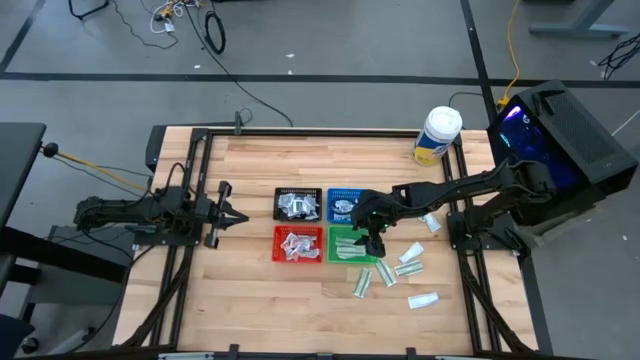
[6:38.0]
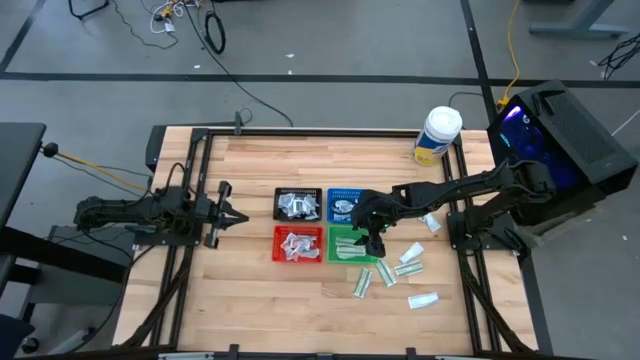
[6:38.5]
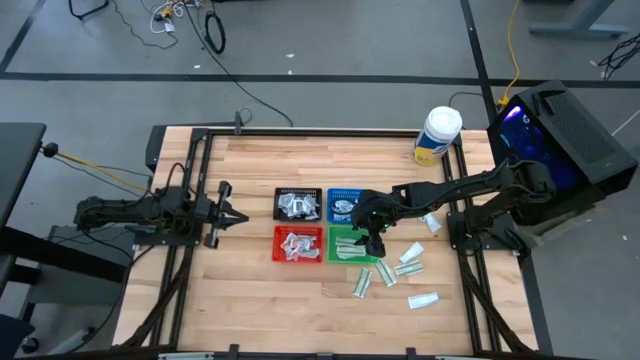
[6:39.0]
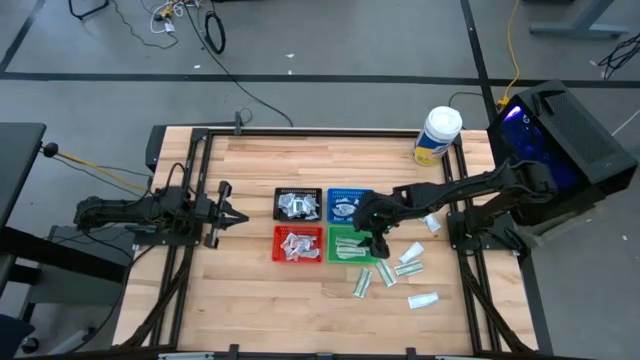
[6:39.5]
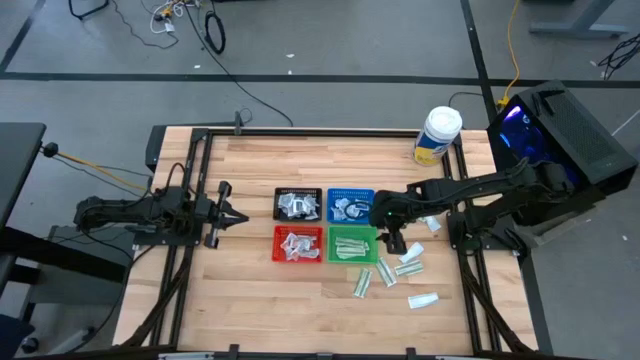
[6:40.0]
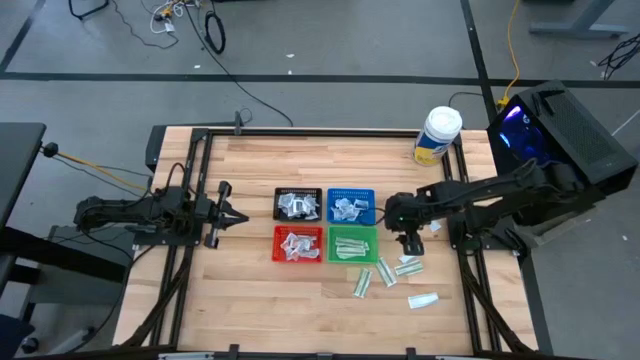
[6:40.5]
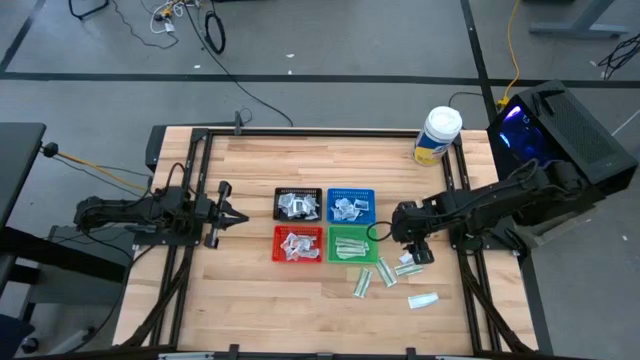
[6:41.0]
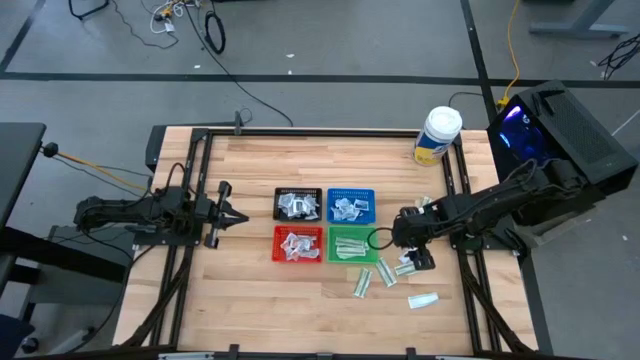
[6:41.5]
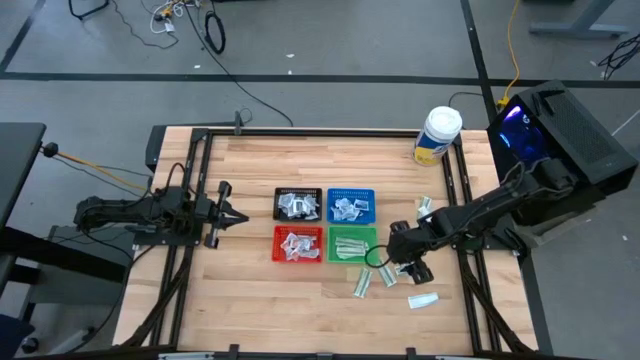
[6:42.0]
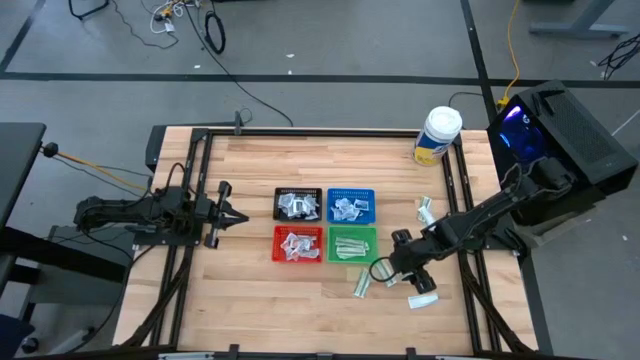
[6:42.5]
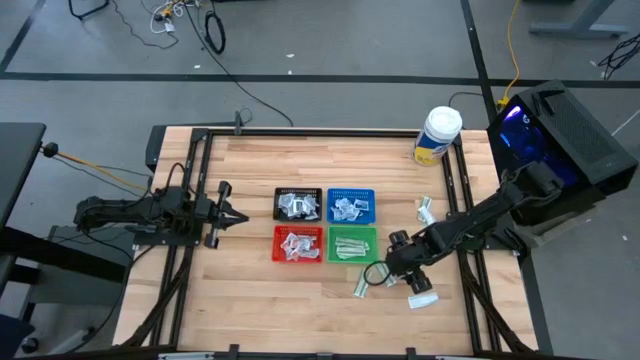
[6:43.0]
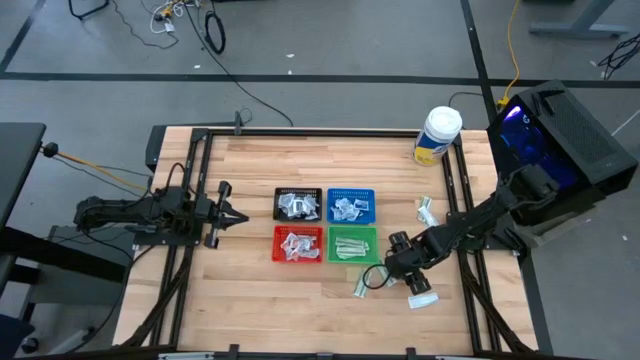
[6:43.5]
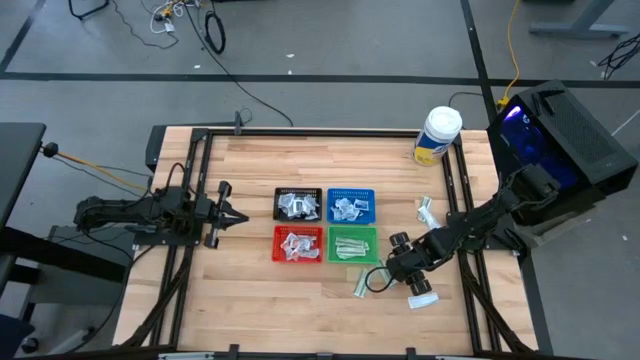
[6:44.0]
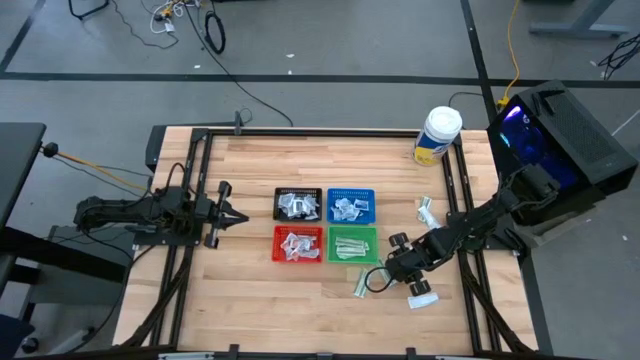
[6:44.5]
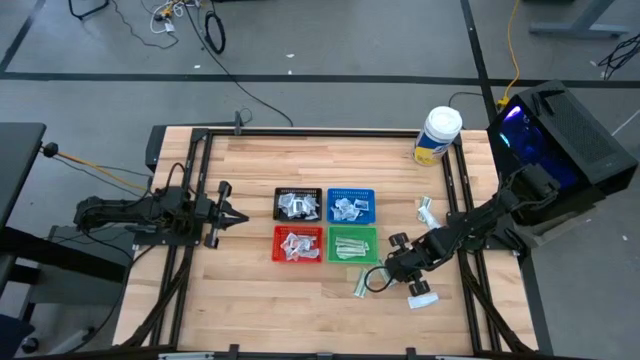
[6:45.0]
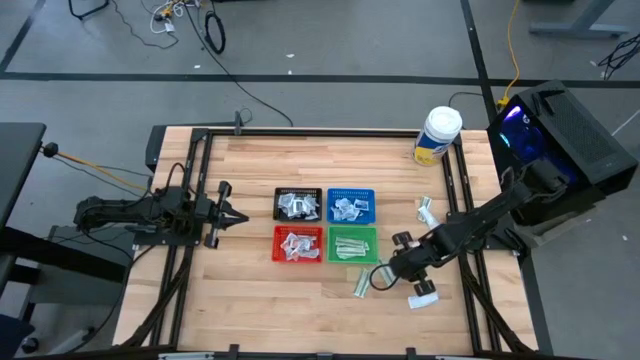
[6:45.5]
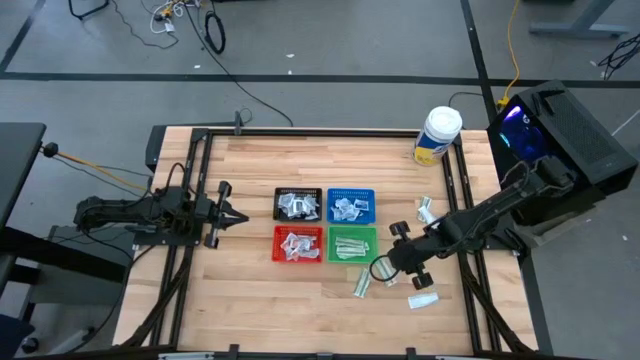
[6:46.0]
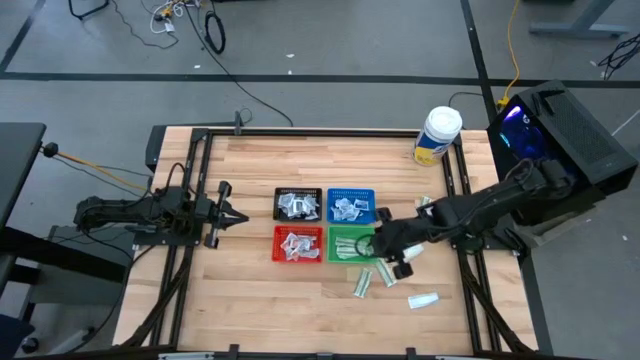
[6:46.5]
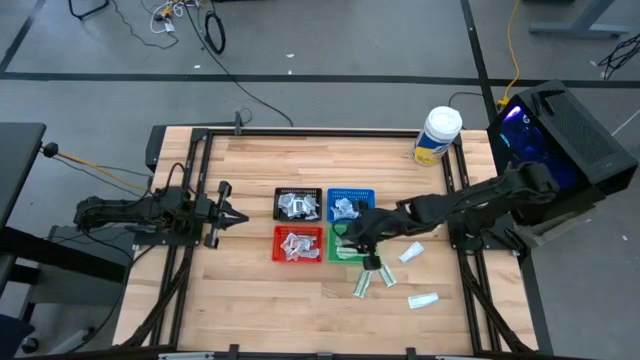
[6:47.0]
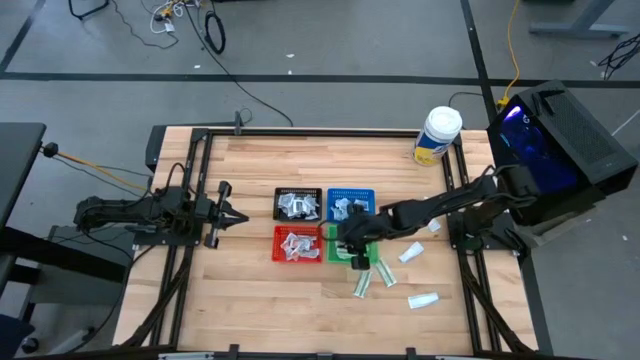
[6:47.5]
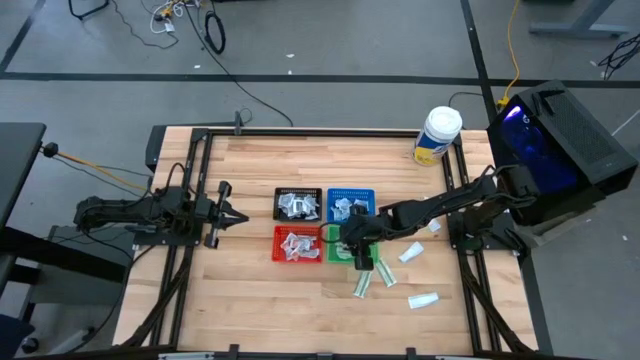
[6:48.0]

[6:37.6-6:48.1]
Task: Pick & Place First Aid Supplies
Put the green bandage pack into the green bin

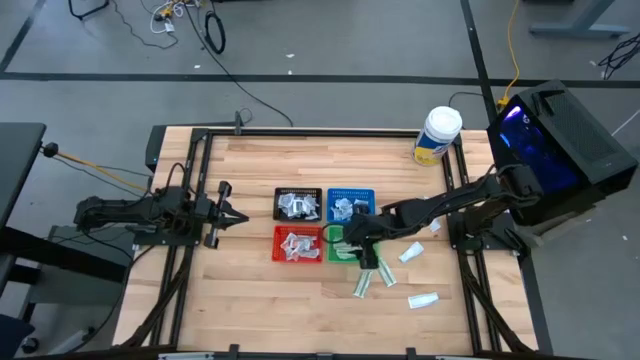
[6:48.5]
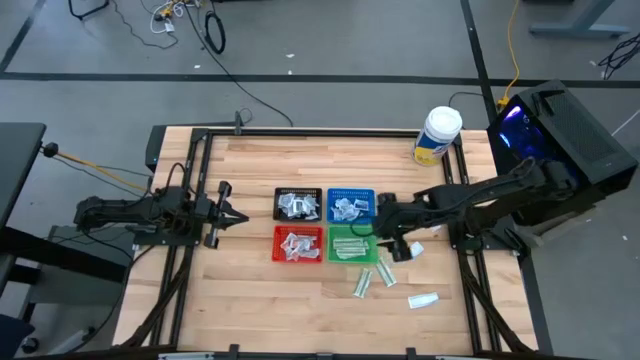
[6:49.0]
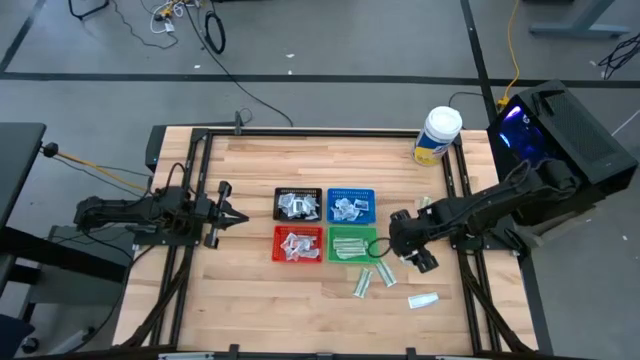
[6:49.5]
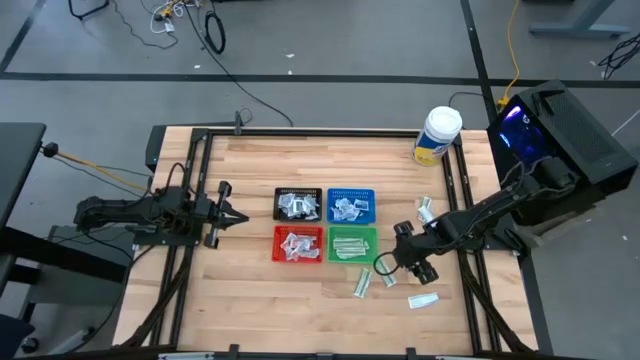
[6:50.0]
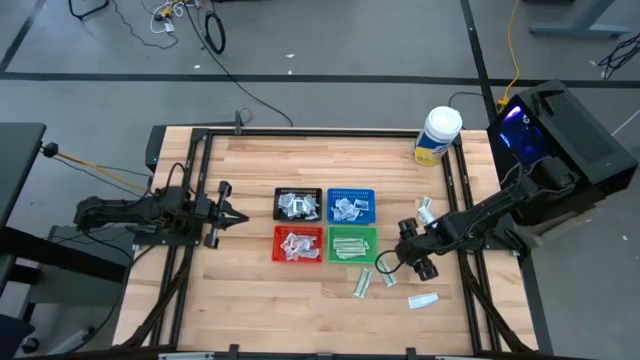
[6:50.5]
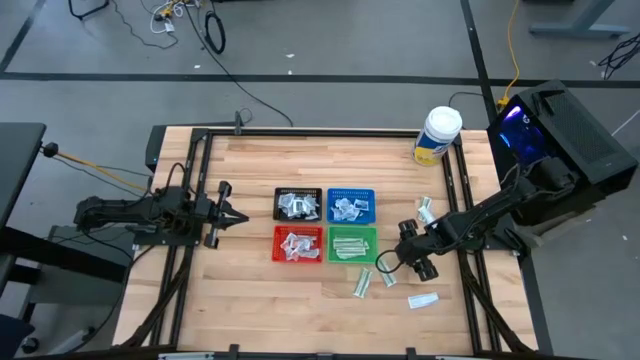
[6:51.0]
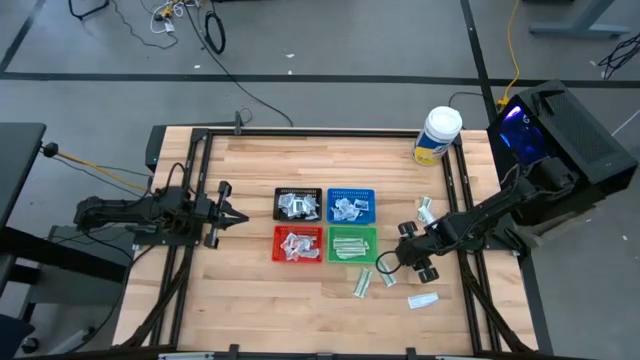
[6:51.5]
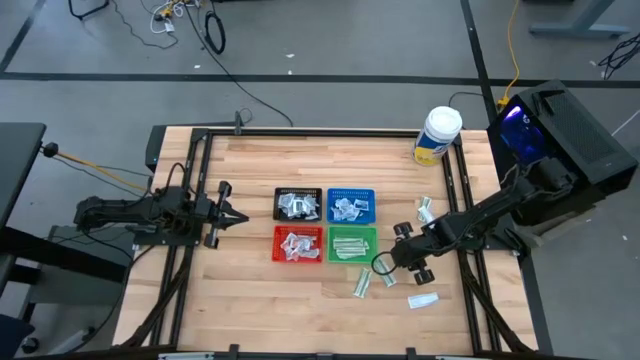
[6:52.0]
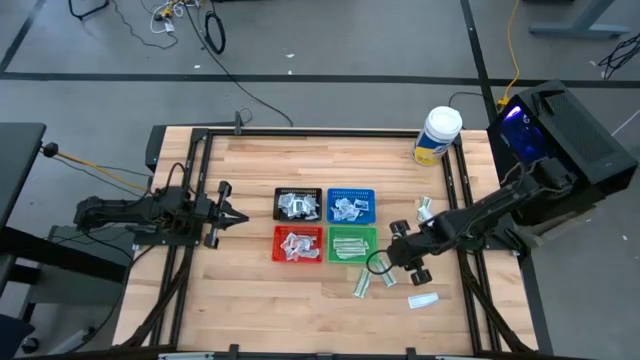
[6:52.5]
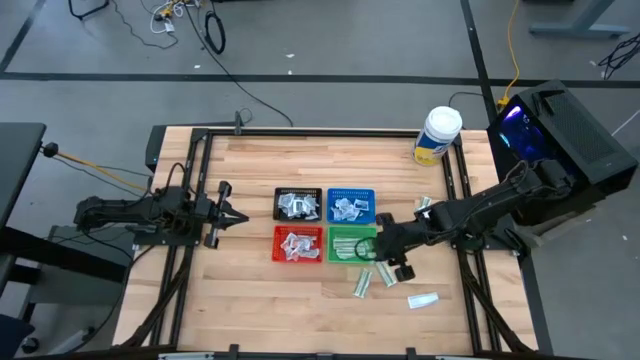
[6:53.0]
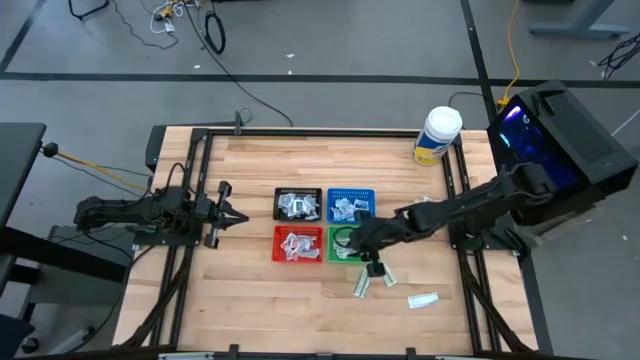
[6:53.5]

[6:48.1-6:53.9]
Put the green bandage pack into the green bin

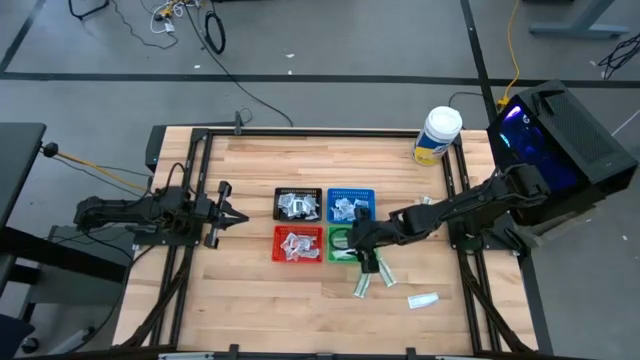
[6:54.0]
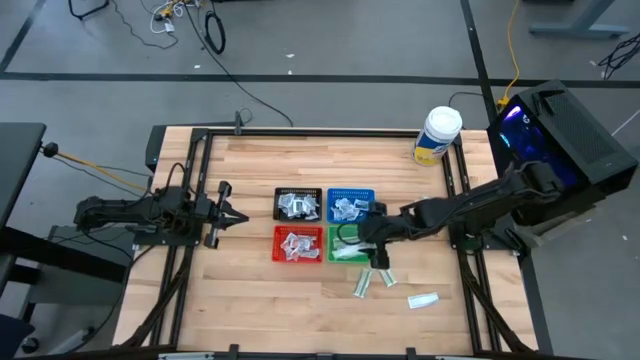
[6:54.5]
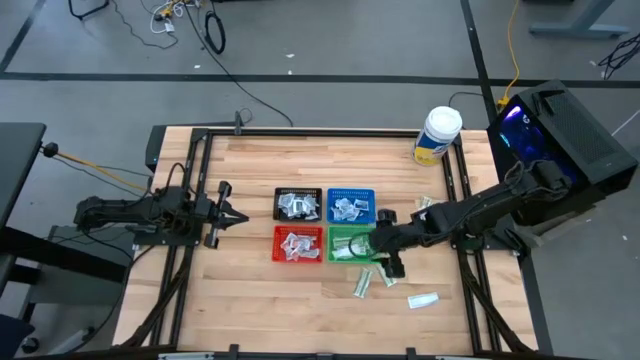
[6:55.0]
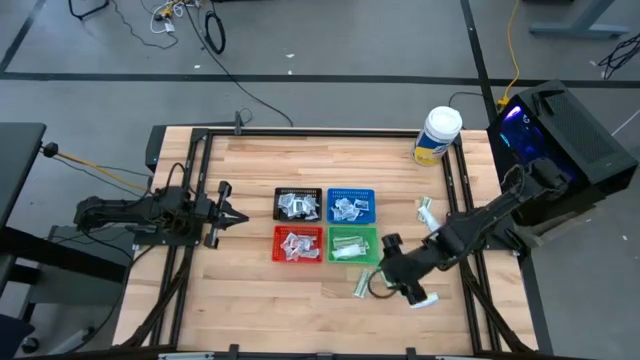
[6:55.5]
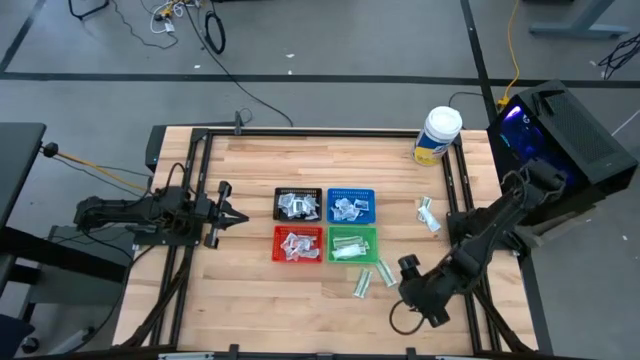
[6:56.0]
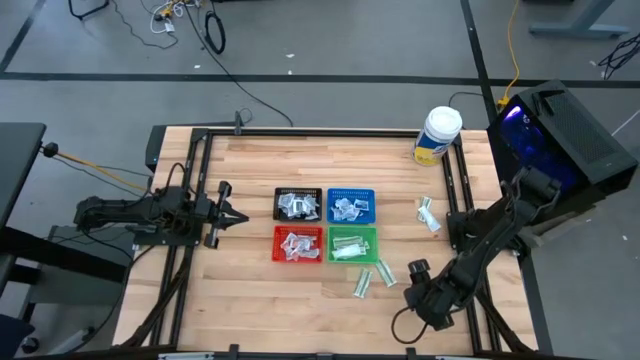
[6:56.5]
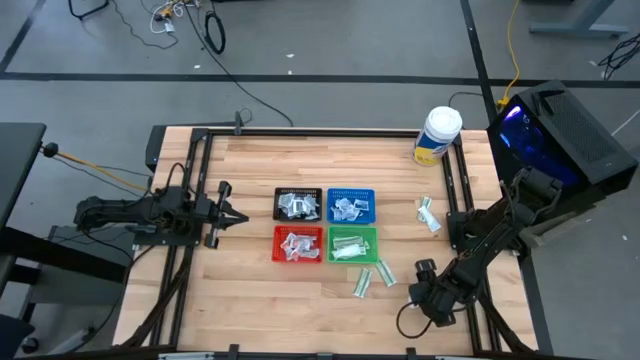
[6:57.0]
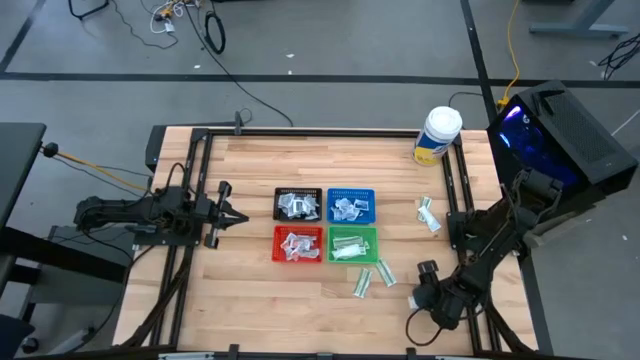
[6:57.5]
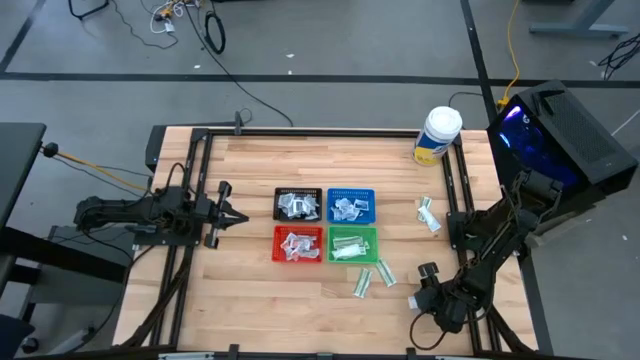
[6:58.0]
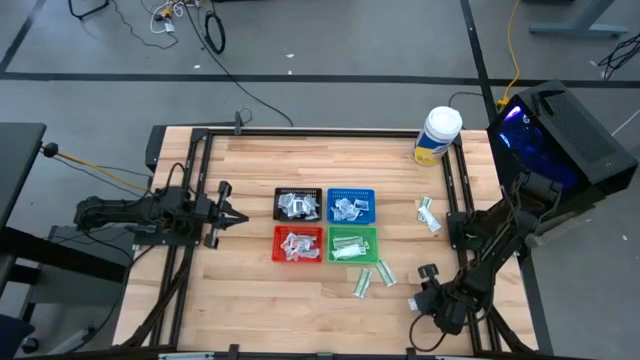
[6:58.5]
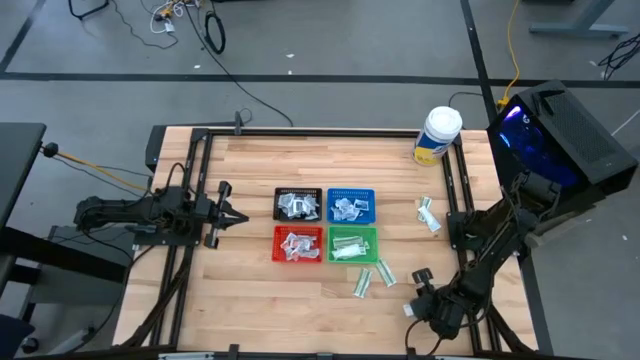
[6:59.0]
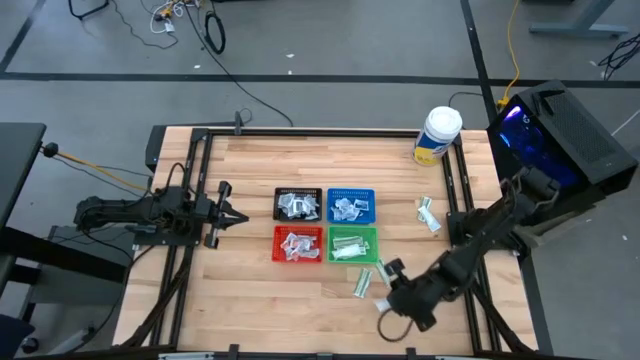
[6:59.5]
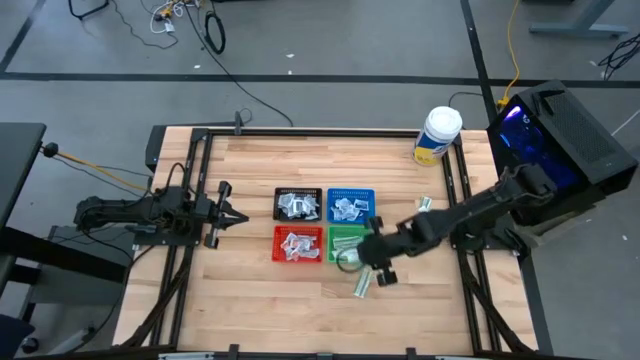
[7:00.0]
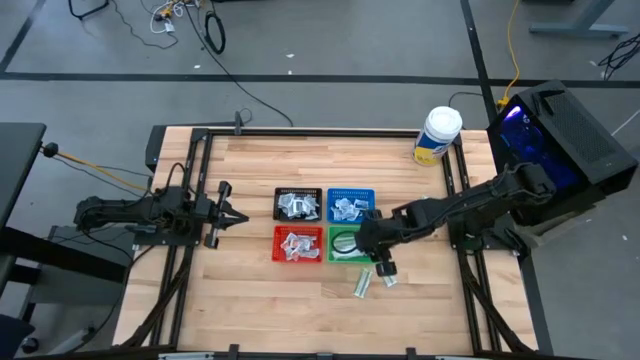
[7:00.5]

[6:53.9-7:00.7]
Put the green bandage pack into the green bin
